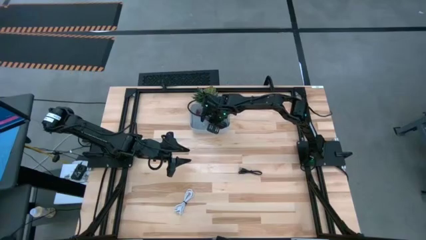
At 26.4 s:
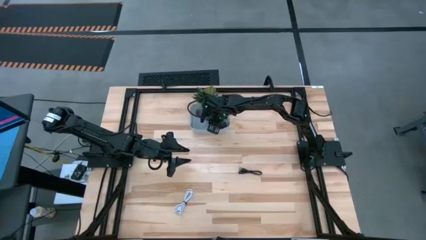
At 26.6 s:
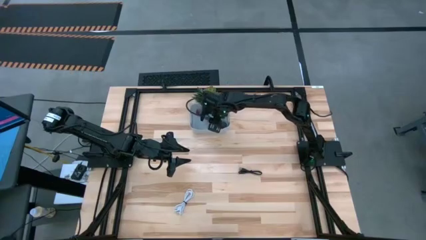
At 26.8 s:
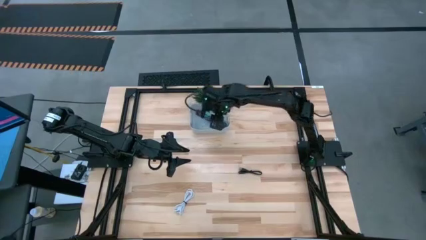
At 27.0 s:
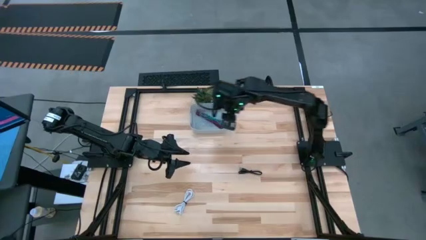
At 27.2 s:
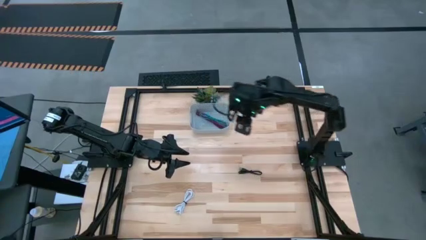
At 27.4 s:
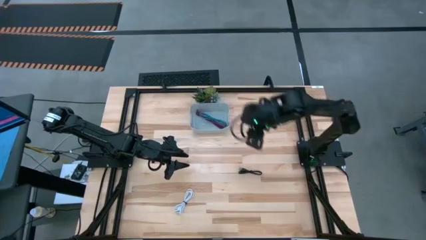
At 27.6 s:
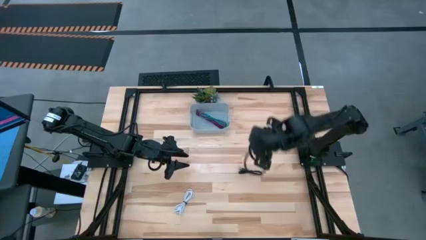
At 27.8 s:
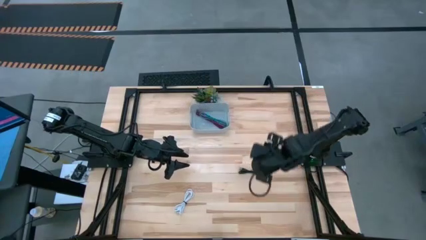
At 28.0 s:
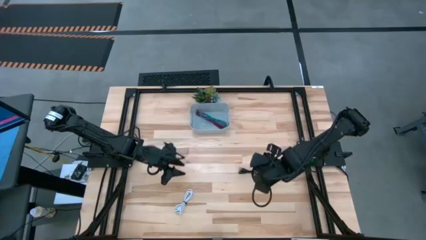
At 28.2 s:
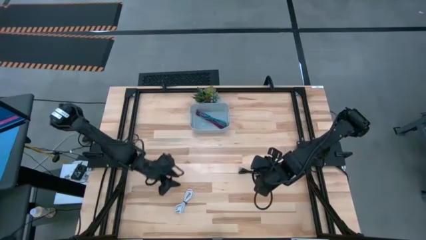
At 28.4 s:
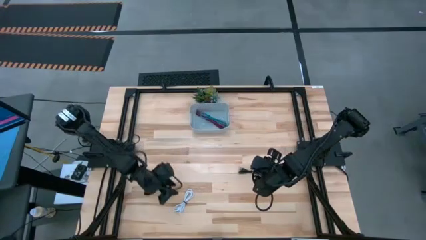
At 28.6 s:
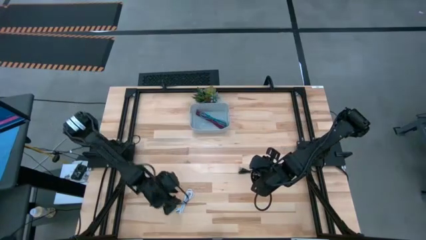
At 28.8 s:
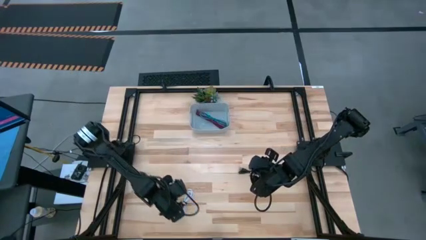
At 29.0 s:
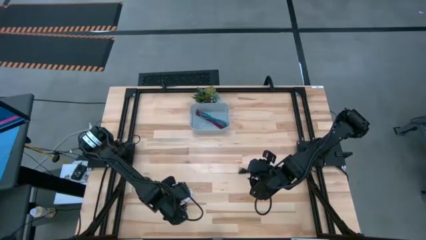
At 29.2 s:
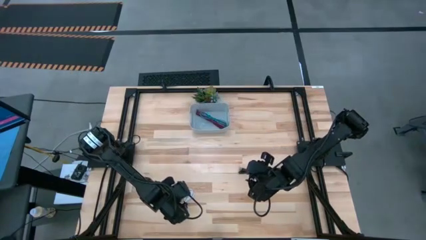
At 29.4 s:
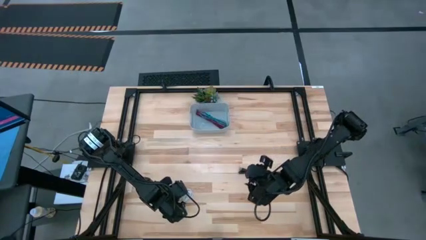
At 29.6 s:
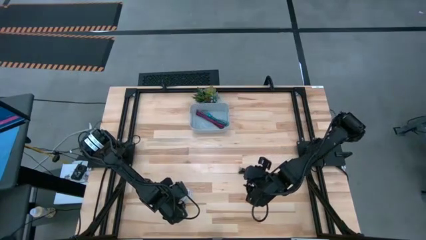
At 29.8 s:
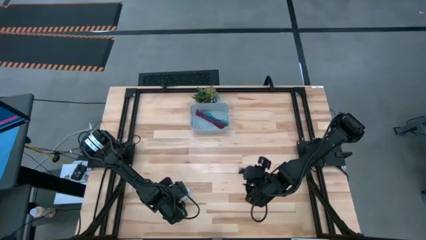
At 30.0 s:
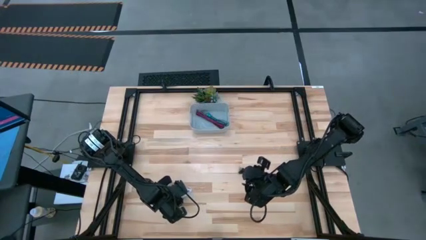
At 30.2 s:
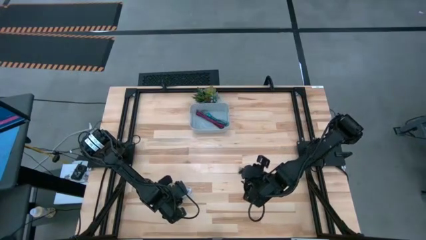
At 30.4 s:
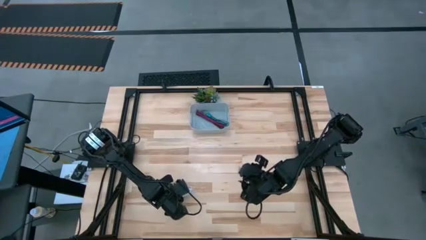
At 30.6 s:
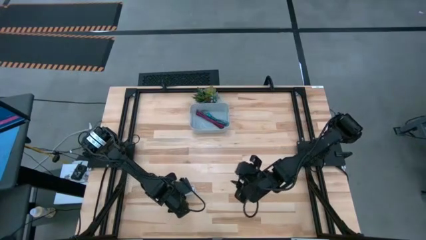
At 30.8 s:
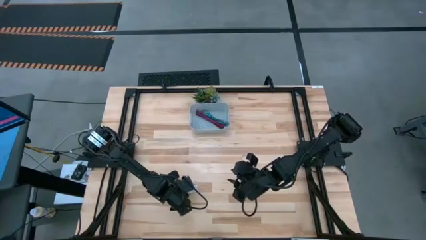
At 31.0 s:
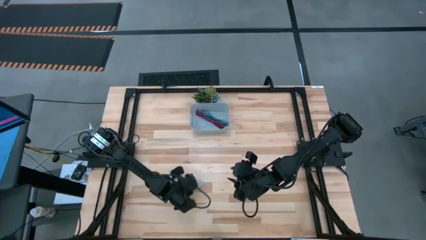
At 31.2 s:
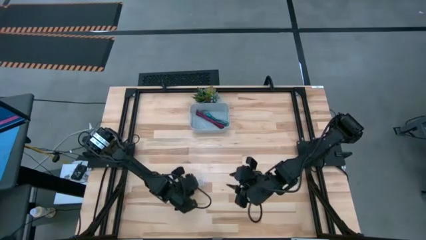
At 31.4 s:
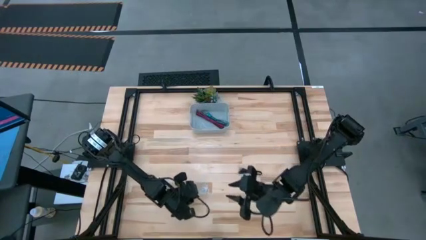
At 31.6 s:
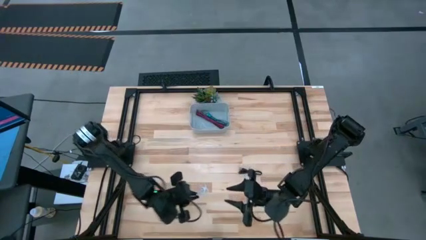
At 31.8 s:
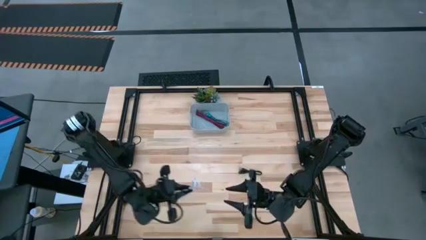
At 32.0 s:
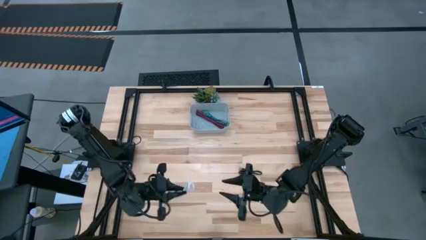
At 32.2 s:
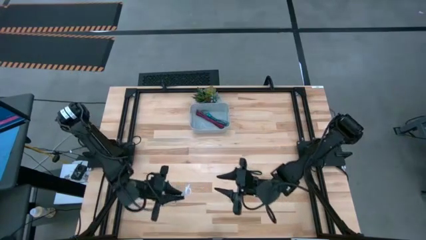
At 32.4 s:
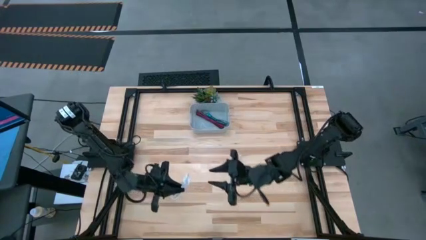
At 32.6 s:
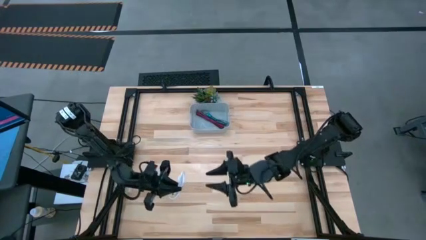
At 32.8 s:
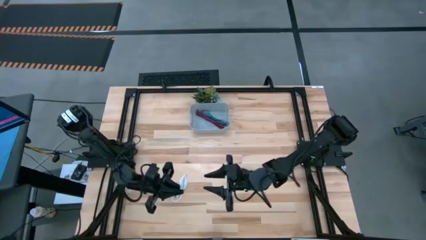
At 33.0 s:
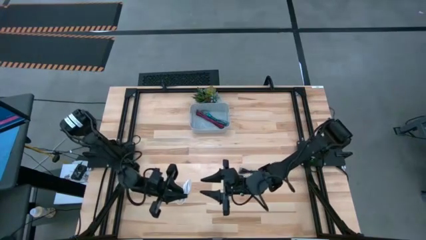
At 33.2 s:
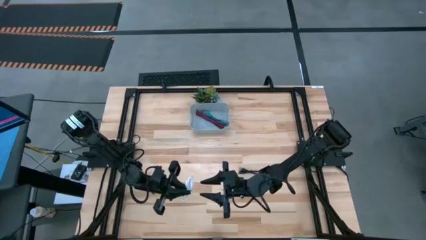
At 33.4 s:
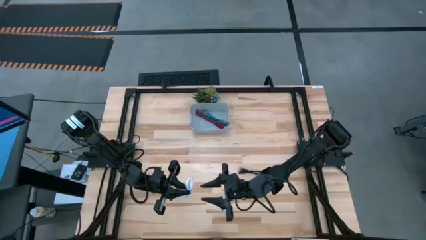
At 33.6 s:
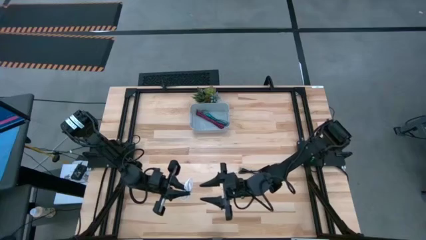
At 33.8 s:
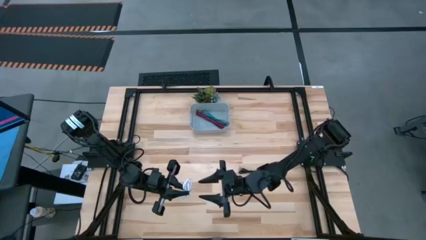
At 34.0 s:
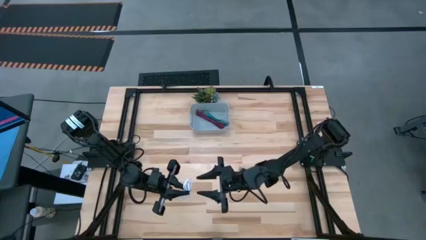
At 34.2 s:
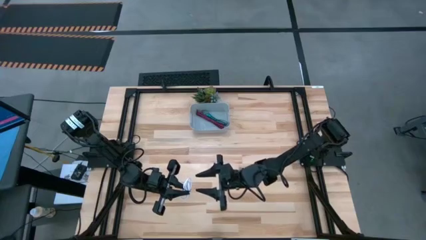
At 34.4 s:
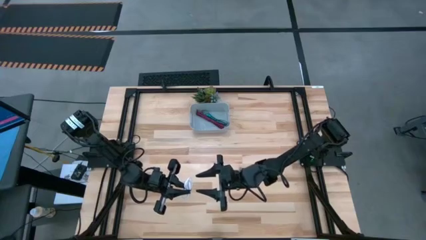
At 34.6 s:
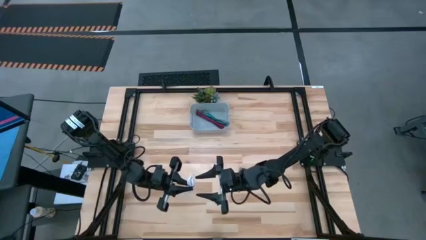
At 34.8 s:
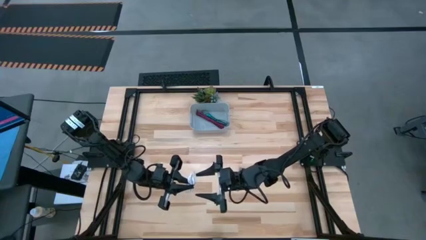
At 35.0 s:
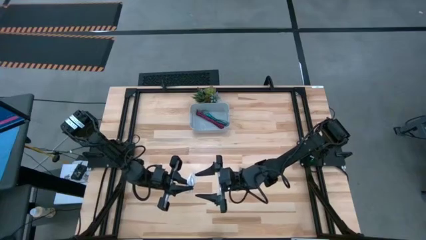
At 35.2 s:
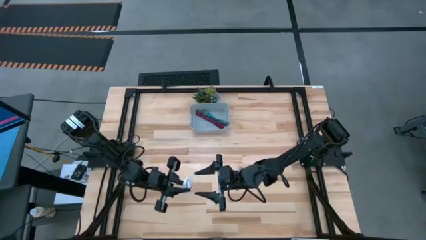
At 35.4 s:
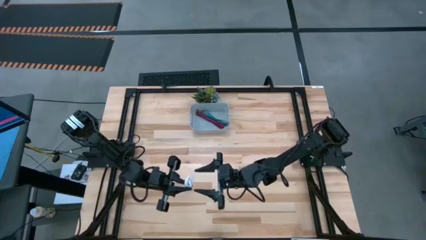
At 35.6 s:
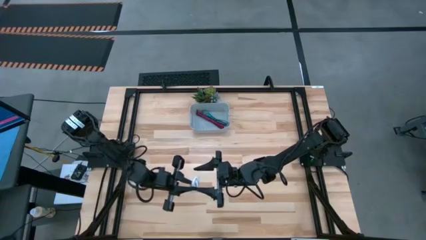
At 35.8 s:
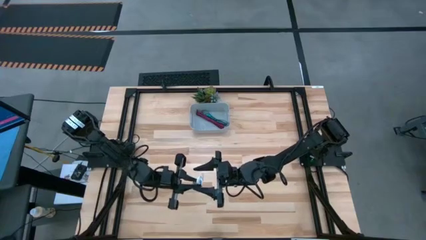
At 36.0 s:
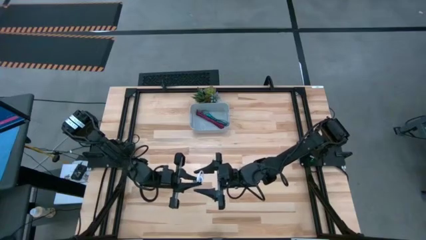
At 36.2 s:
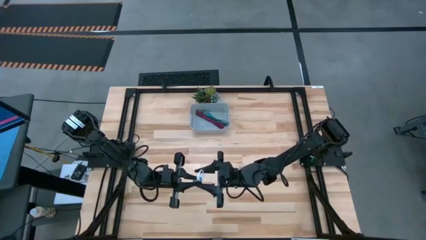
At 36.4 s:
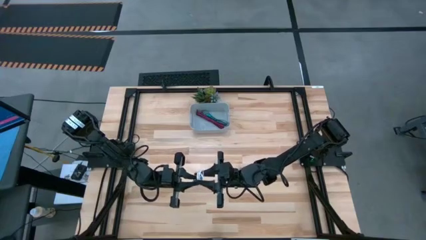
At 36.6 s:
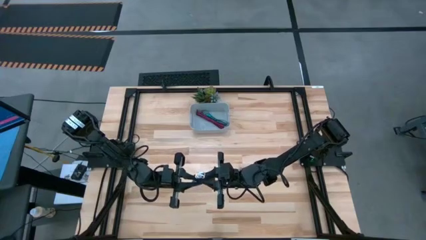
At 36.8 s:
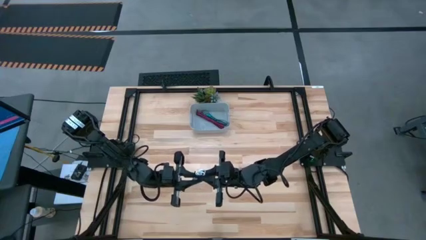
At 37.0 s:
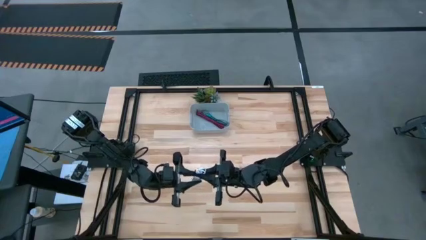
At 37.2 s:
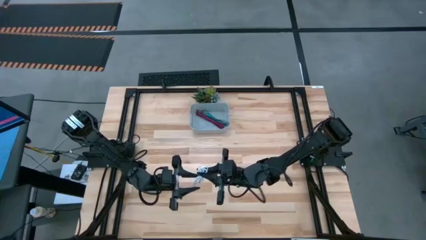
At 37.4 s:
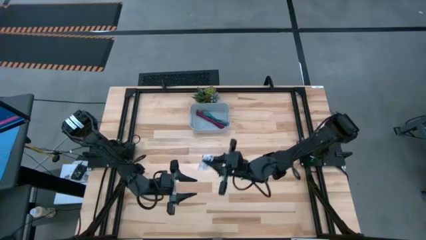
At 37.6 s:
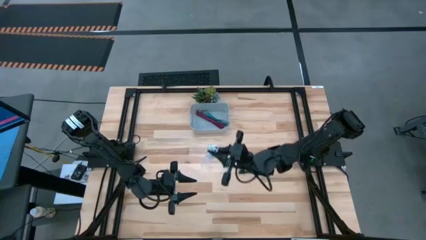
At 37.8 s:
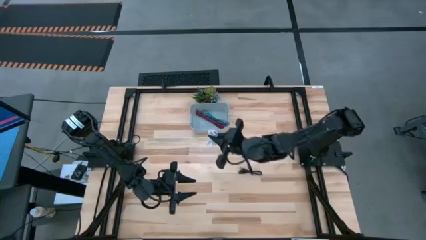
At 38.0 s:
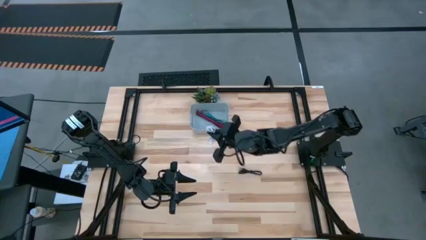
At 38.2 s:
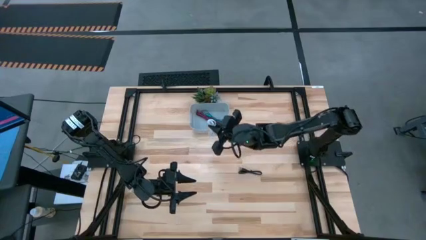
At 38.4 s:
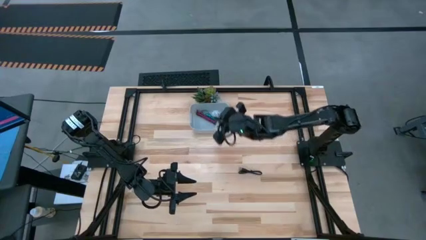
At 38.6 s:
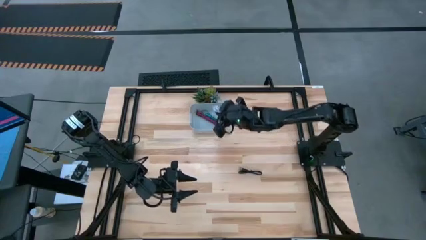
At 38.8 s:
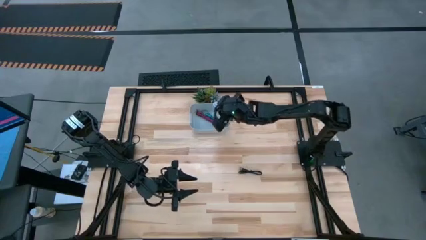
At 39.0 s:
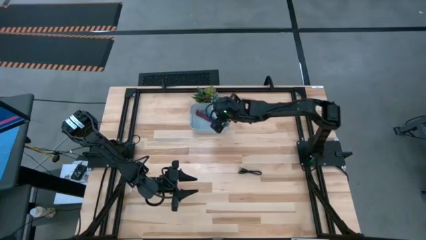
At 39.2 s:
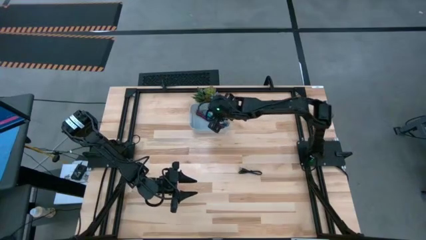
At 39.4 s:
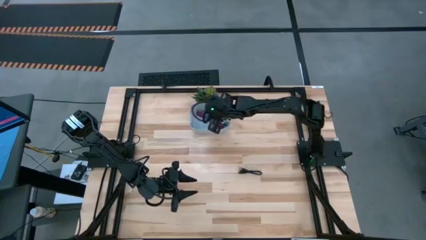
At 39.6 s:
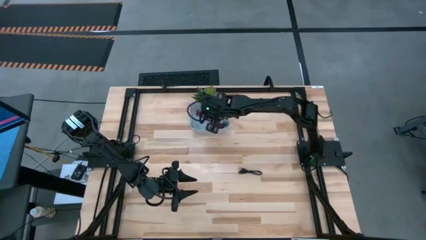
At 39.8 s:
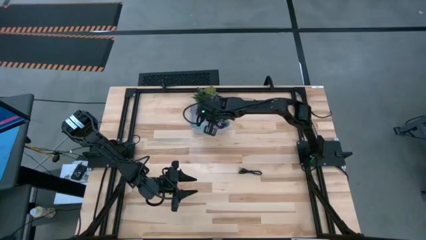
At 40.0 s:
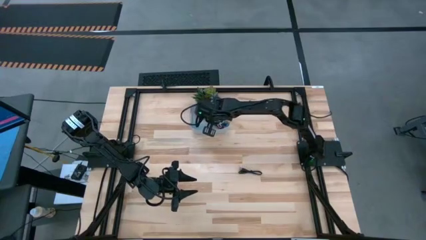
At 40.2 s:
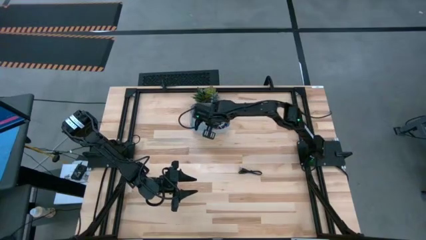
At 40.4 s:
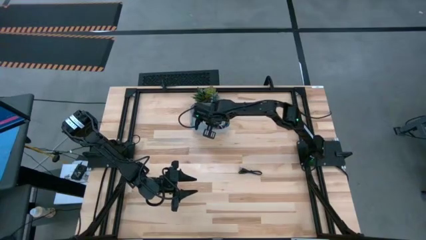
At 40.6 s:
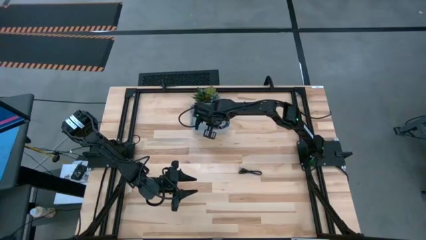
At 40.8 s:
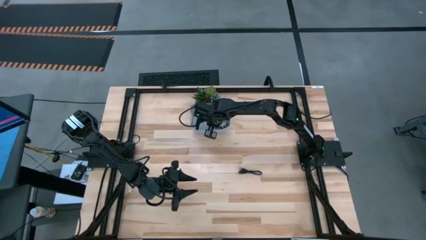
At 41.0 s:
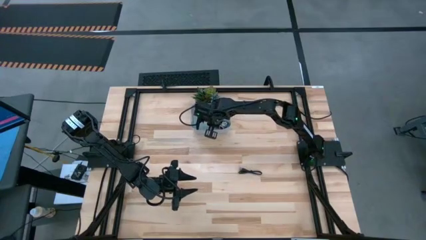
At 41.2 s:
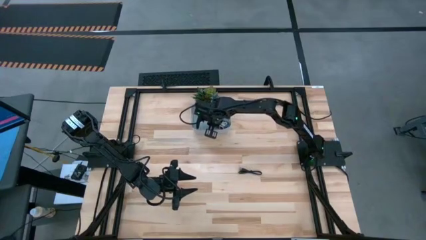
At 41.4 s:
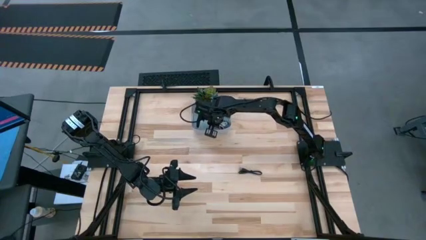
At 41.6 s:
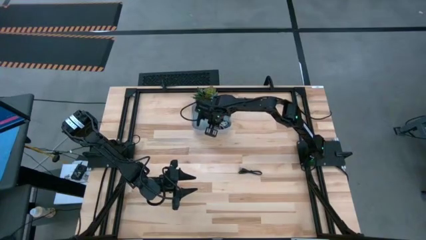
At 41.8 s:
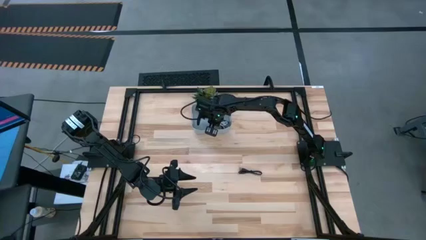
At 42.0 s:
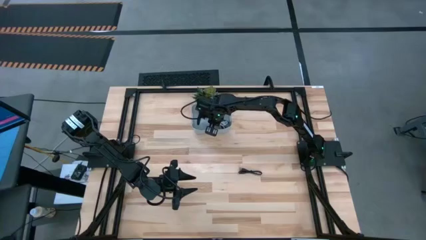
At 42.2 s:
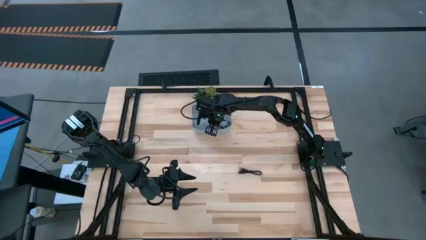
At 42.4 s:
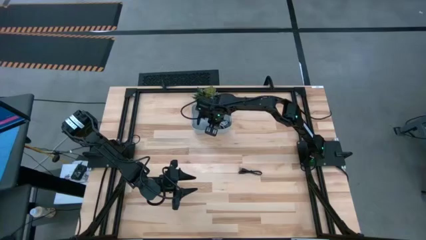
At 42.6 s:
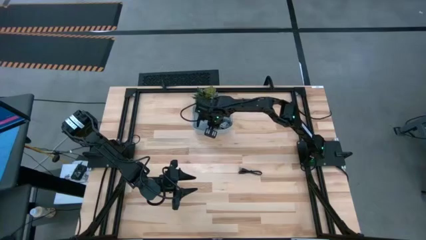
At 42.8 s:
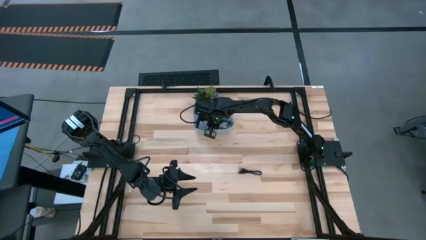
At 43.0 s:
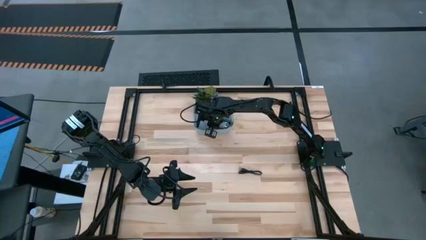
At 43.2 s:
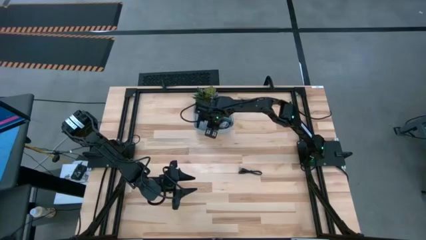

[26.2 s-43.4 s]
Task: Pick and place USB-C Cables
Put the white charger cable into the gray bin
